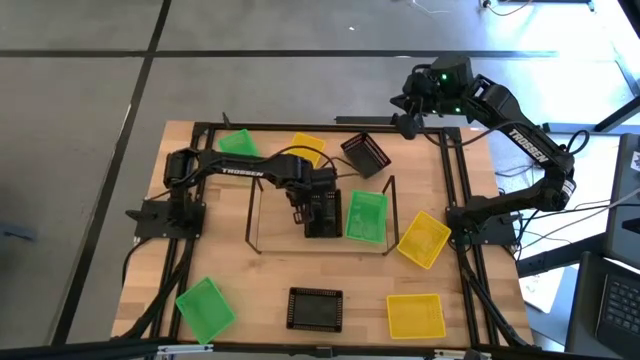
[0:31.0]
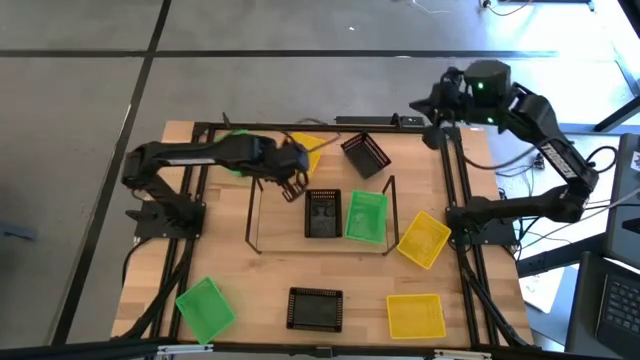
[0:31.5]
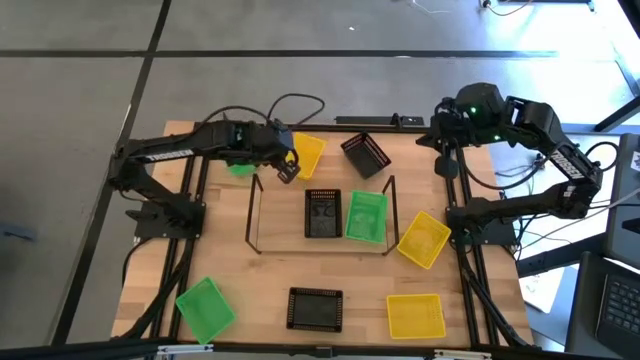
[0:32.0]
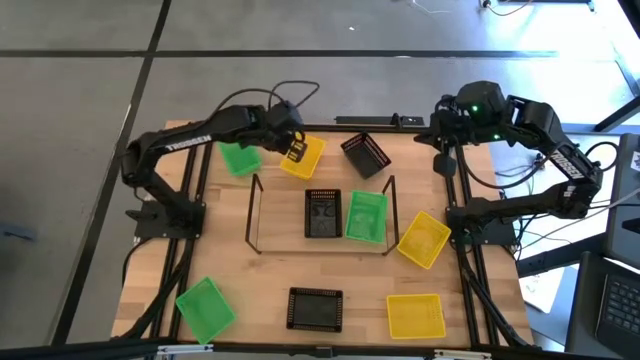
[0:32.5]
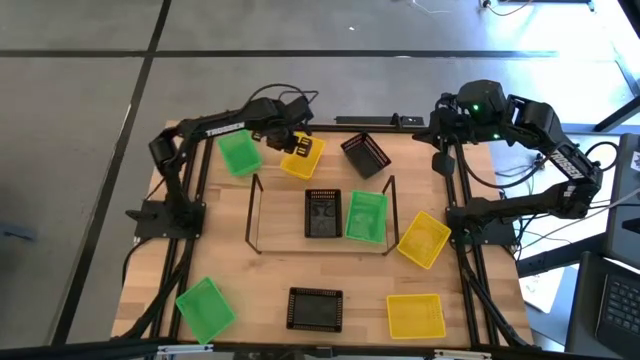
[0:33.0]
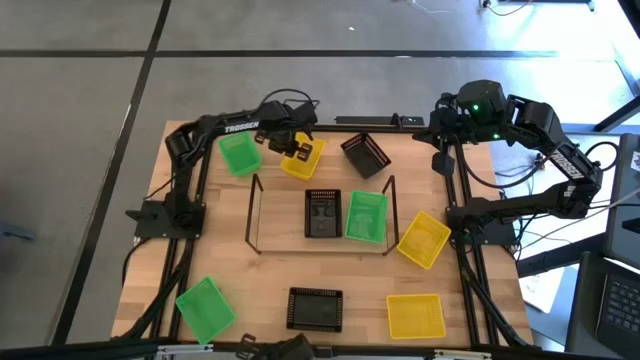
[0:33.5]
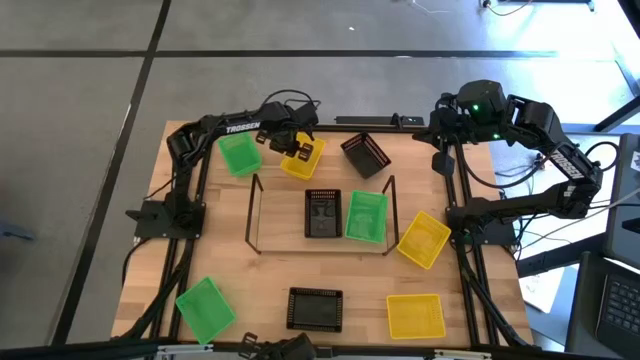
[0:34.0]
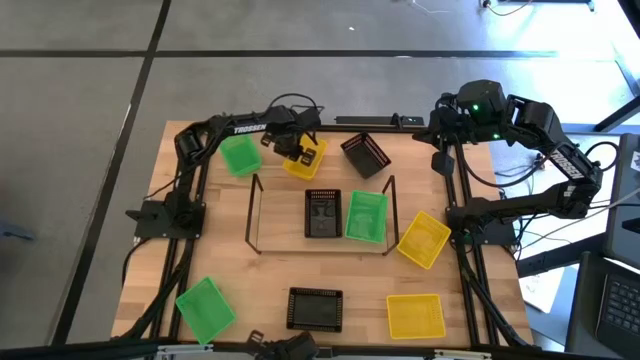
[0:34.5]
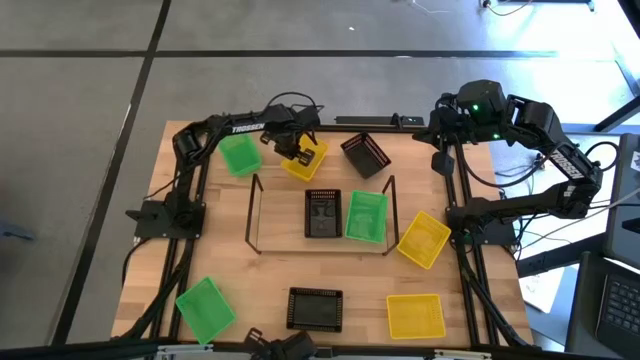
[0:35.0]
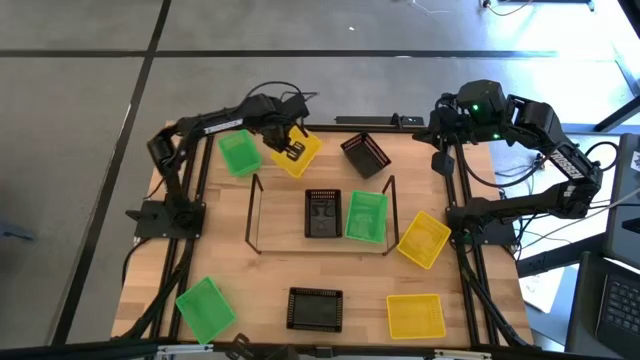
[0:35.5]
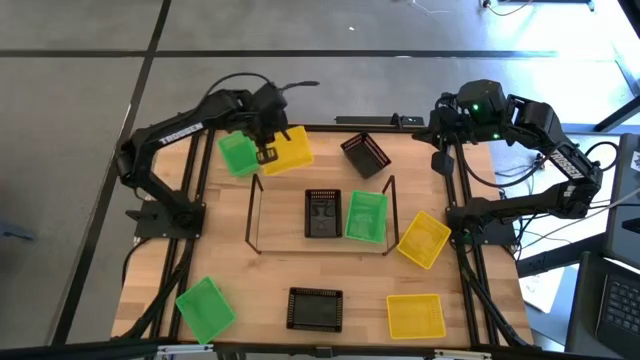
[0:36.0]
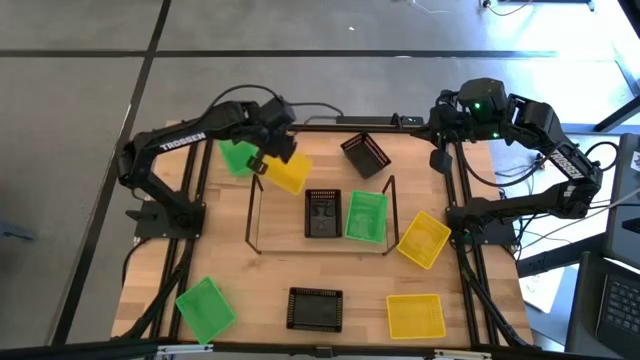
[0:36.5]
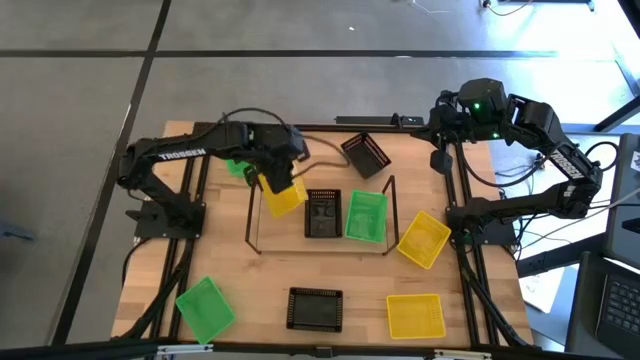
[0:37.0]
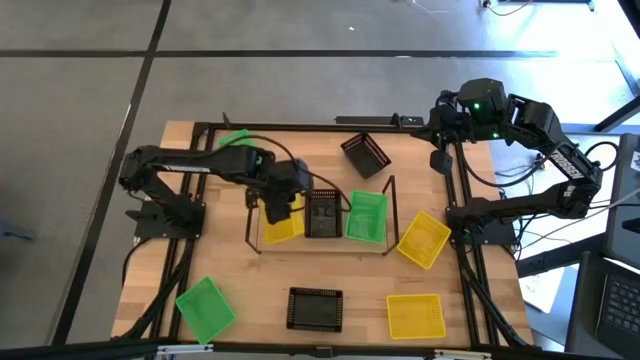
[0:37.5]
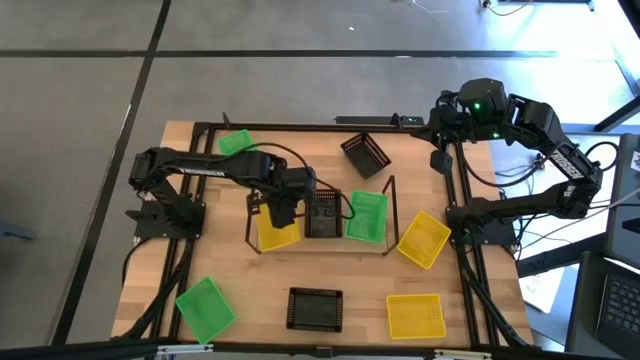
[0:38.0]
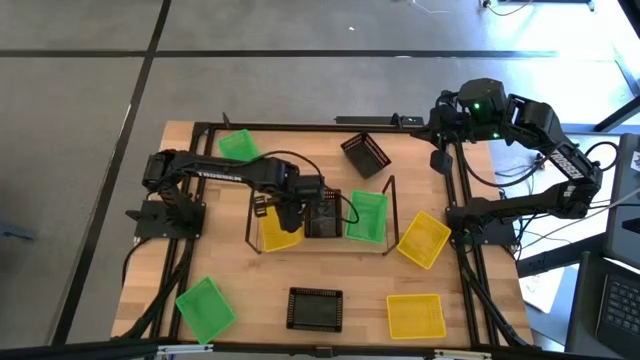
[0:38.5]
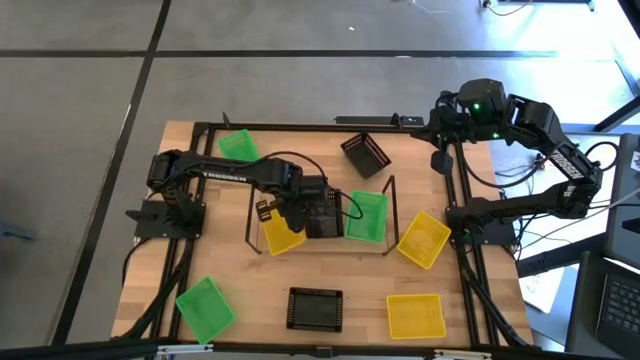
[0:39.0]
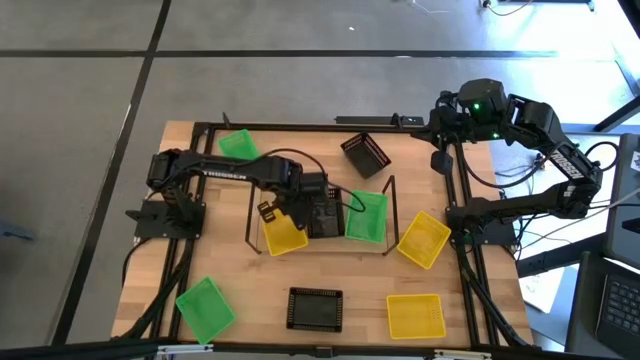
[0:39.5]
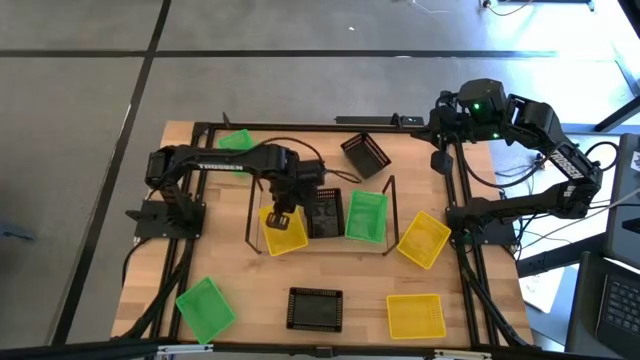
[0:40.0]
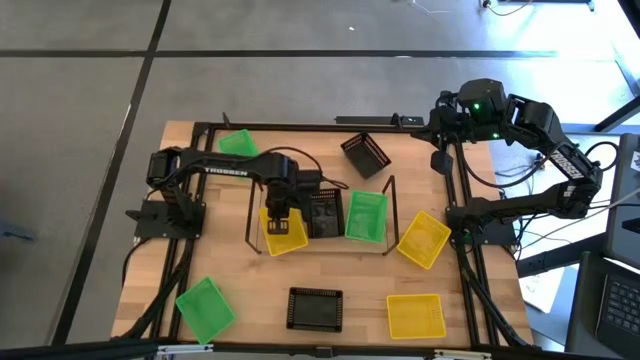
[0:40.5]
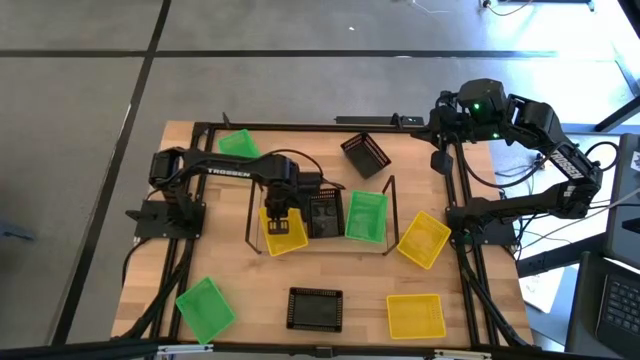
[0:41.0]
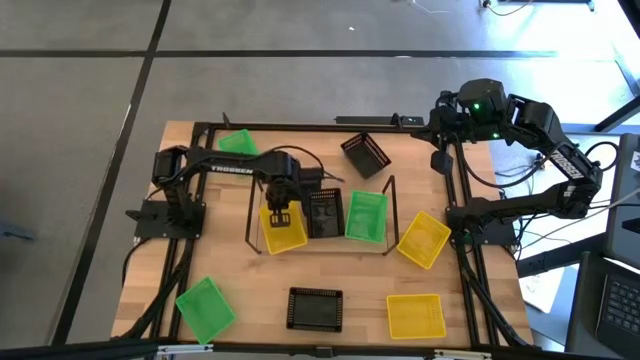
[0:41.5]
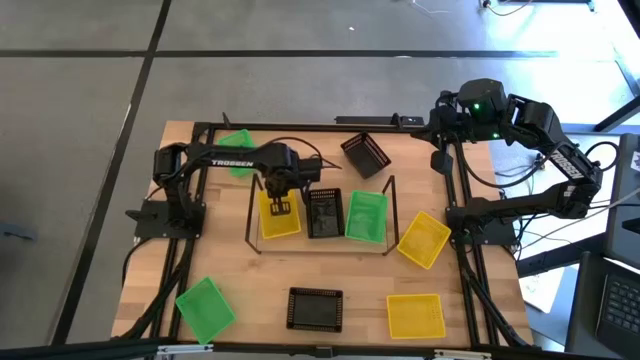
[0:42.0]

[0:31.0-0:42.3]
Task: Stack baskets on shelf by color
Put the top yellow bin on the shelf

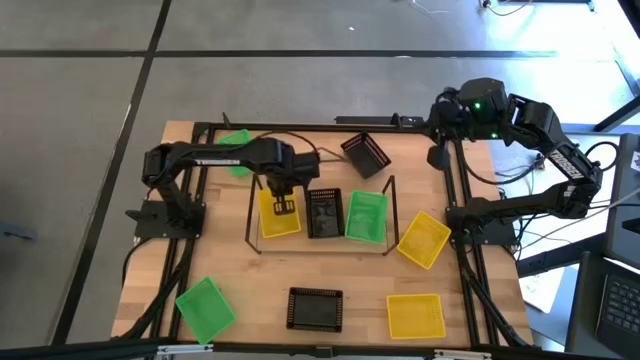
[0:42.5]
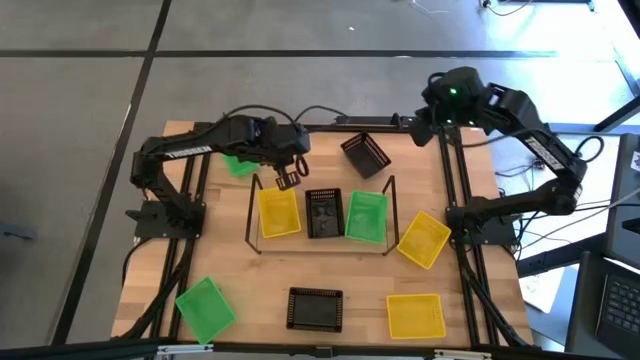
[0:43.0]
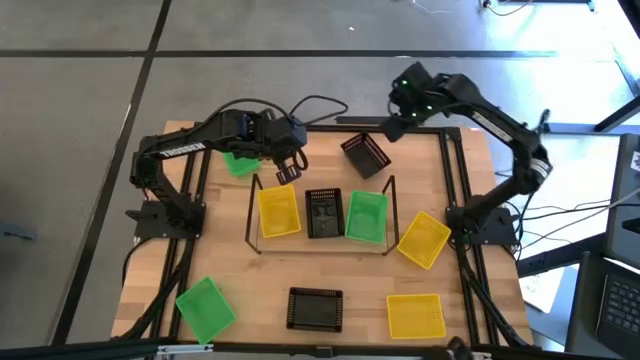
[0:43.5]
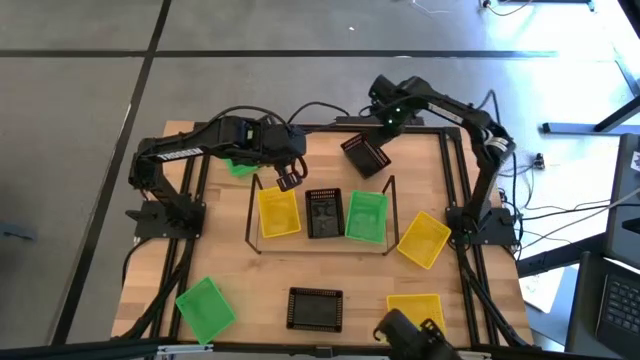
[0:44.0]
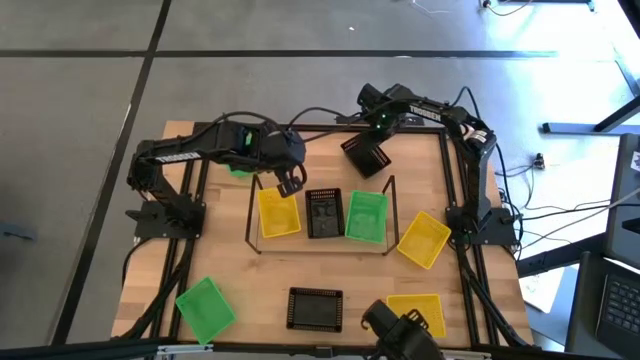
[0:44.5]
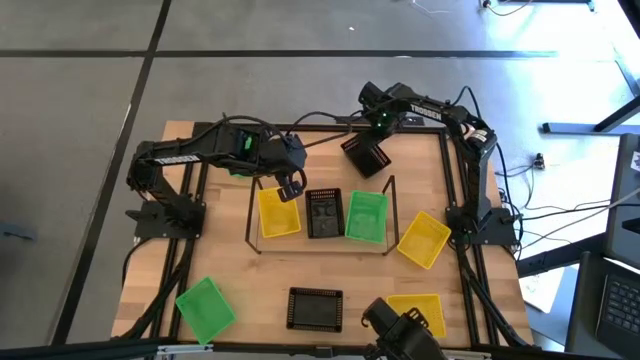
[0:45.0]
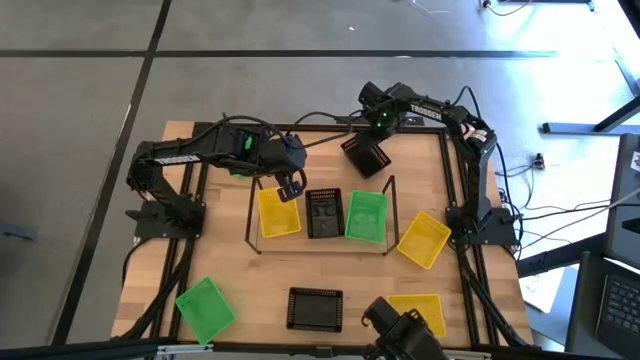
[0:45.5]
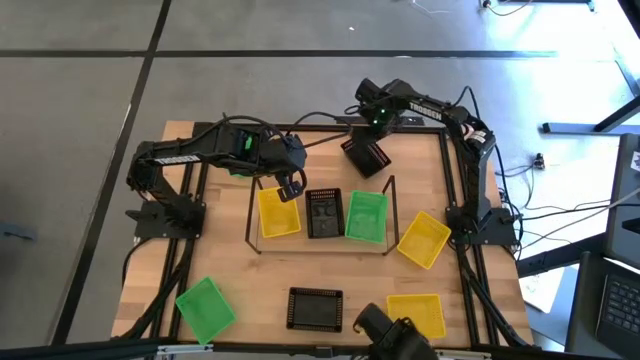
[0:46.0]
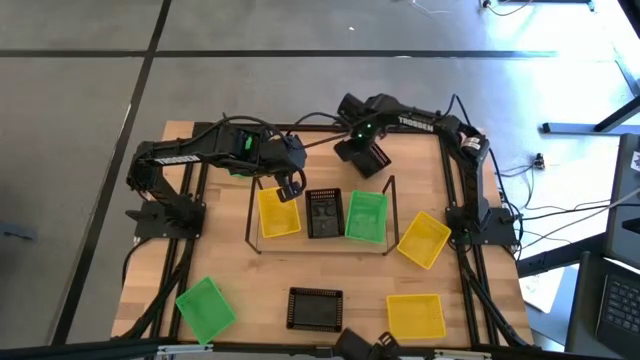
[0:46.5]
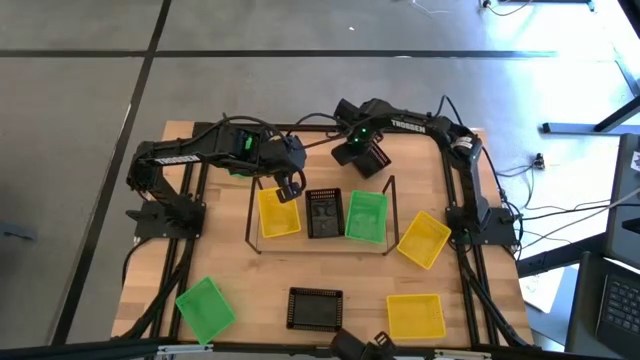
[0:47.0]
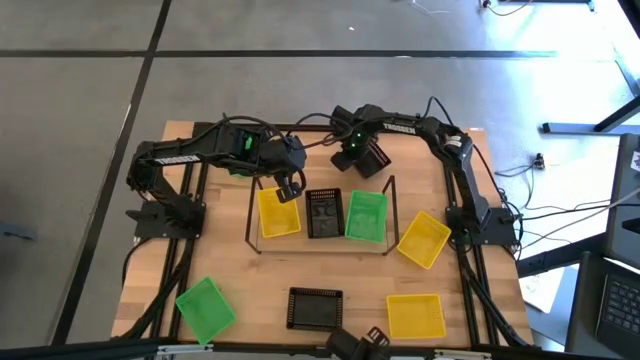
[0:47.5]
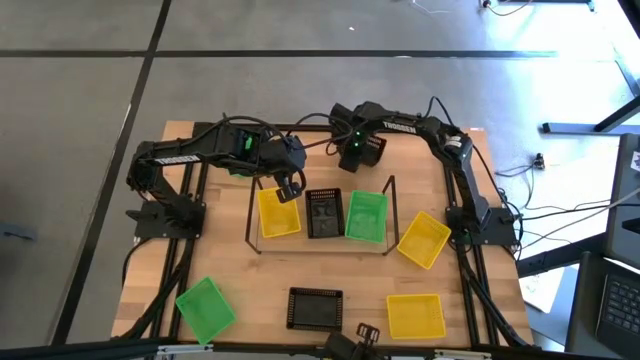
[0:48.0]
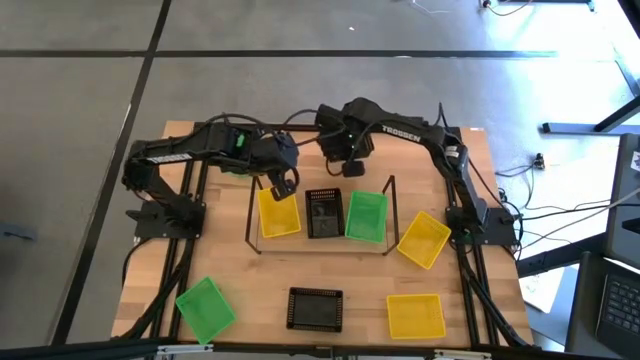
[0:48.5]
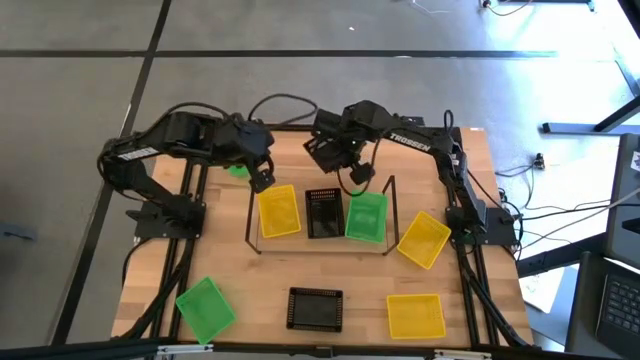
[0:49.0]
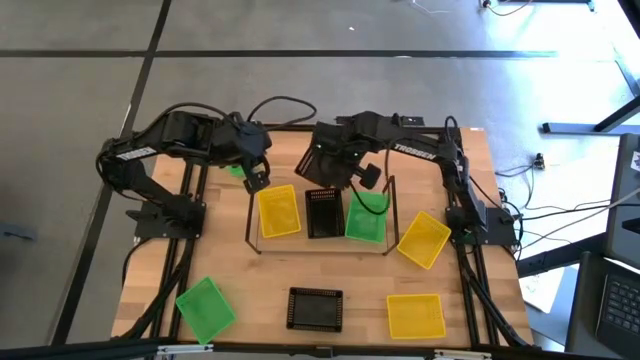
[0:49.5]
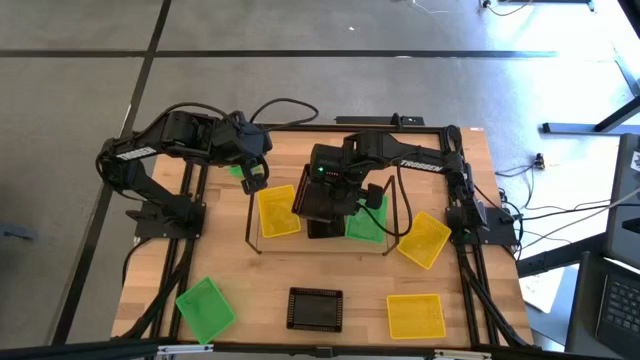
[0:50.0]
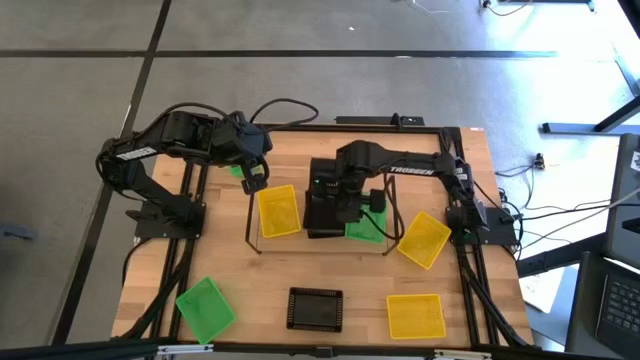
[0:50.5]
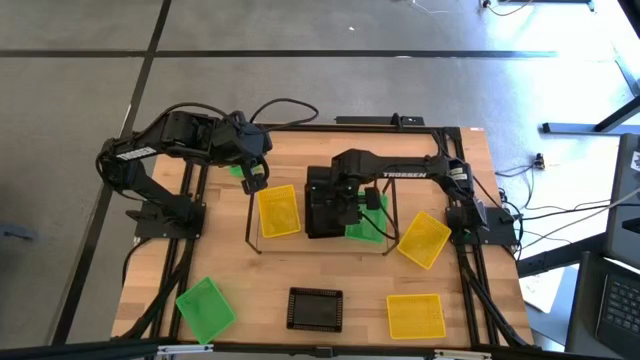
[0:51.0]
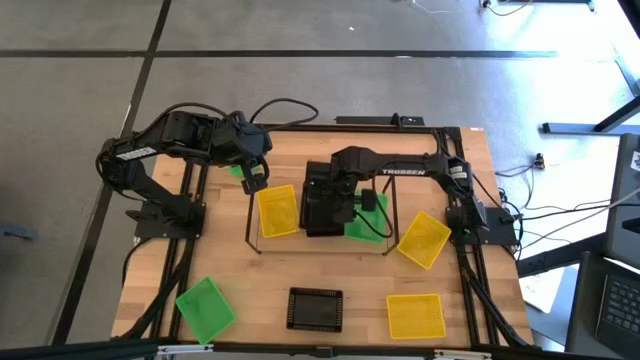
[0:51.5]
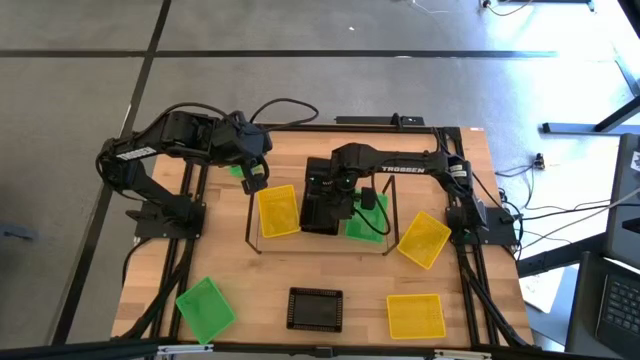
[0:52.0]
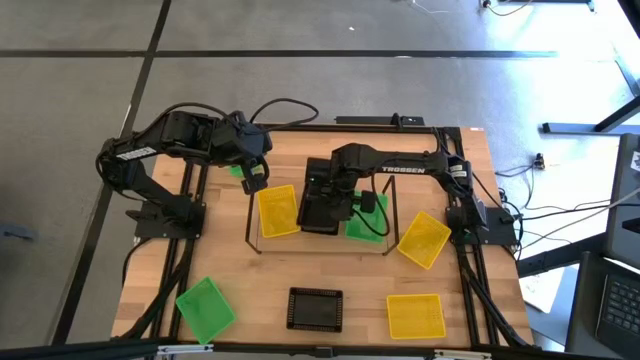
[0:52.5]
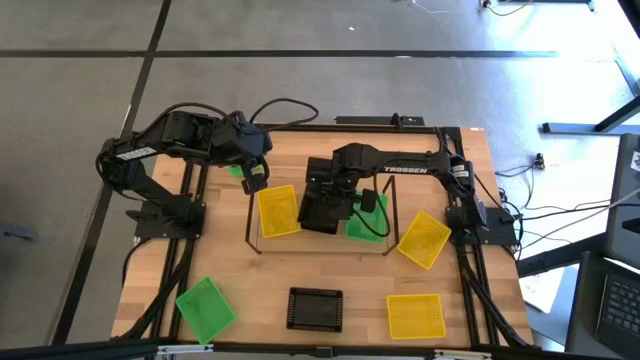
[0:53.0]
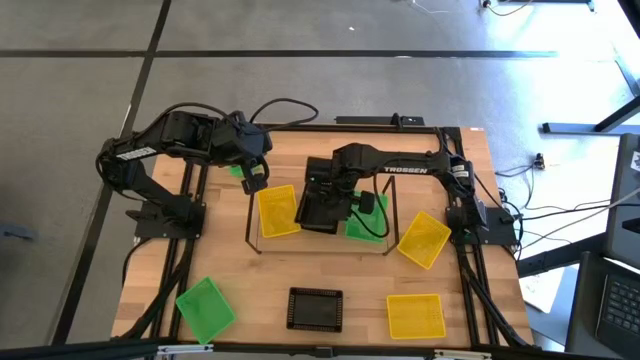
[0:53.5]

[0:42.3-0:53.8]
Stack the top black bin on top of the black bin on the shelf

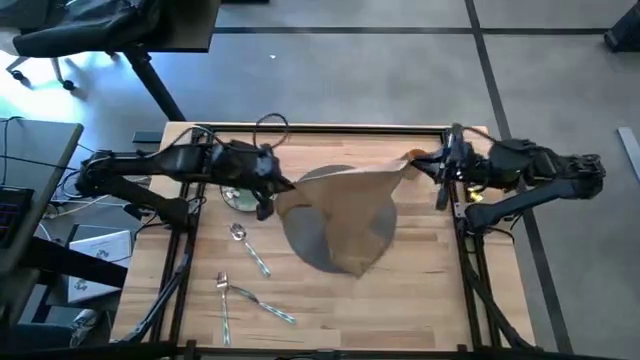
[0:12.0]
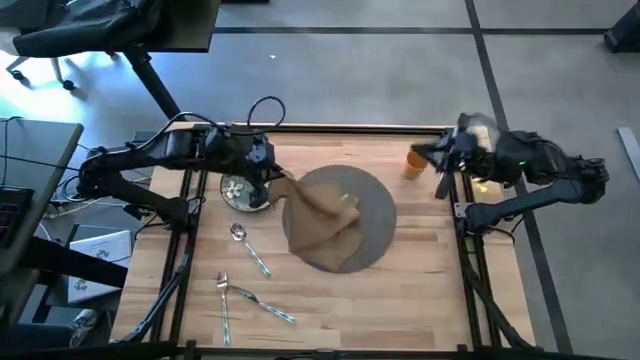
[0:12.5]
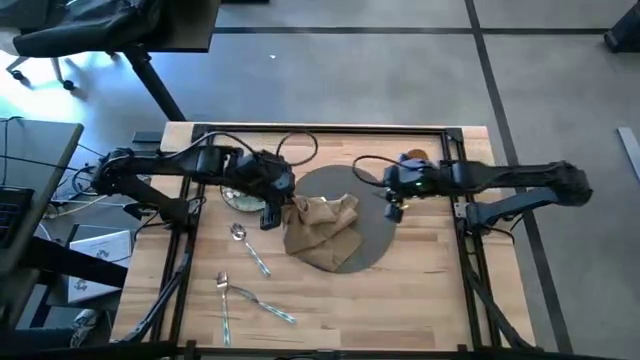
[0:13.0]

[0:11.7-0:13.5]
Task: Set table place
Fold the brown table napkin
